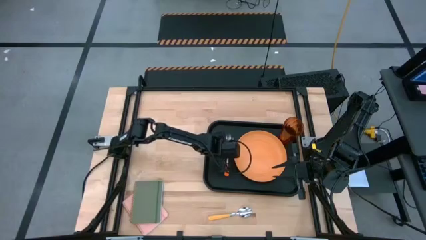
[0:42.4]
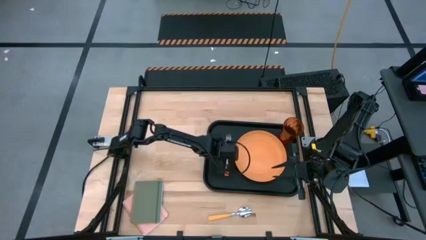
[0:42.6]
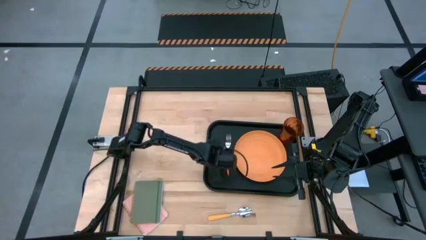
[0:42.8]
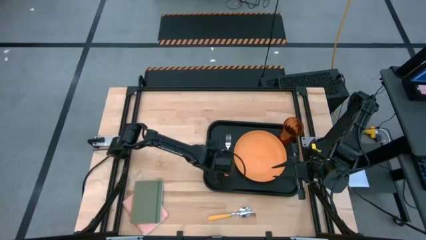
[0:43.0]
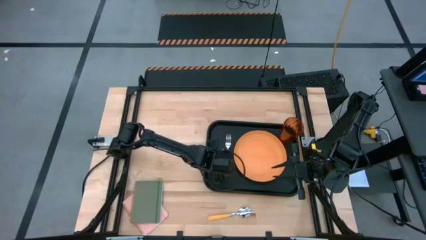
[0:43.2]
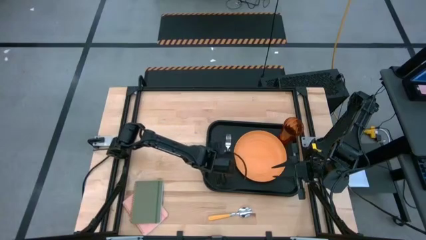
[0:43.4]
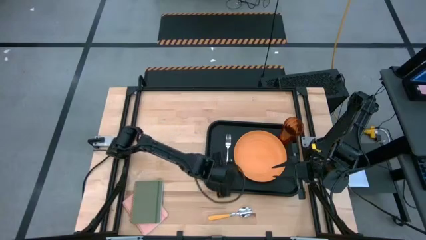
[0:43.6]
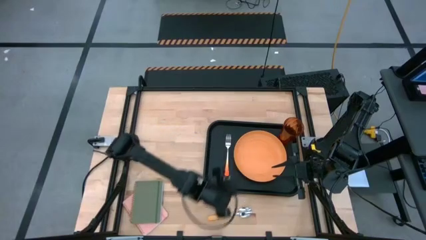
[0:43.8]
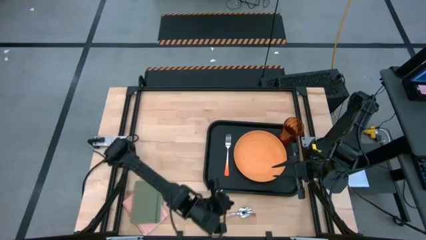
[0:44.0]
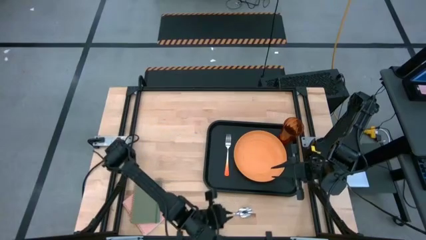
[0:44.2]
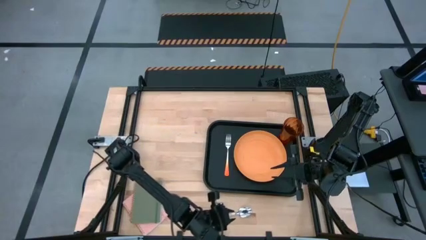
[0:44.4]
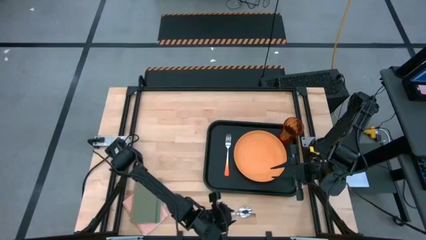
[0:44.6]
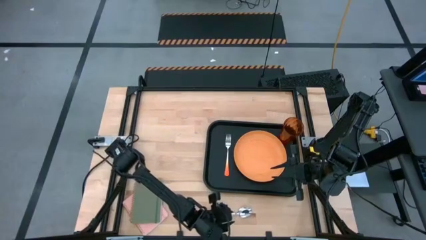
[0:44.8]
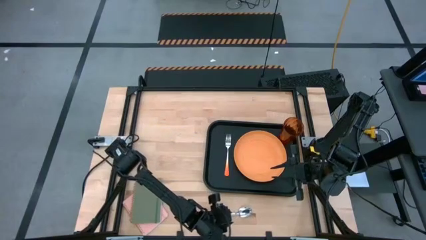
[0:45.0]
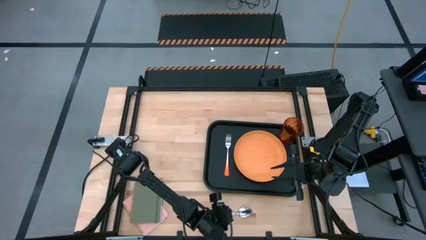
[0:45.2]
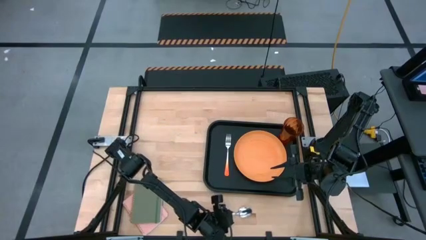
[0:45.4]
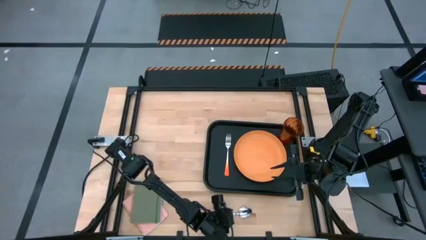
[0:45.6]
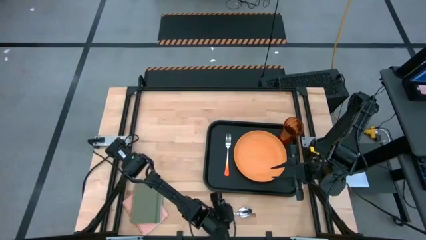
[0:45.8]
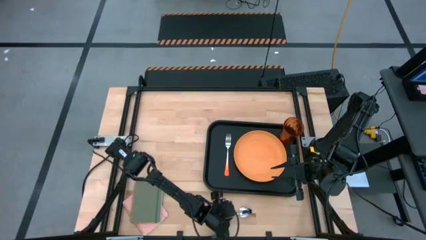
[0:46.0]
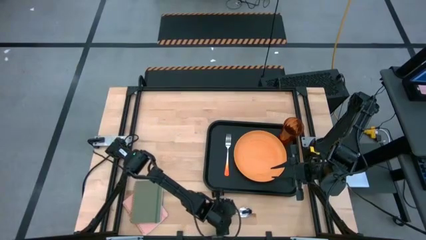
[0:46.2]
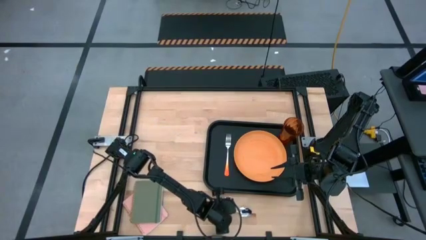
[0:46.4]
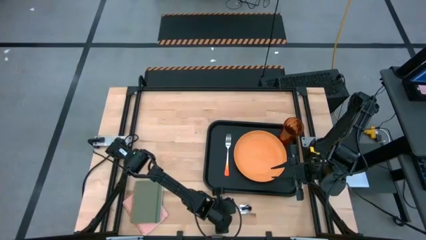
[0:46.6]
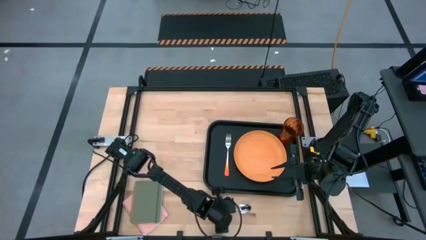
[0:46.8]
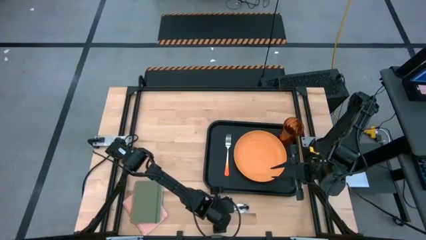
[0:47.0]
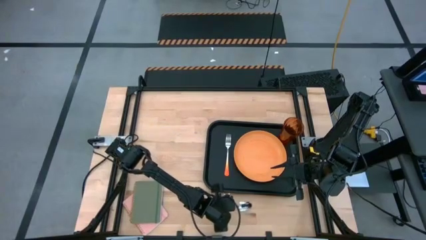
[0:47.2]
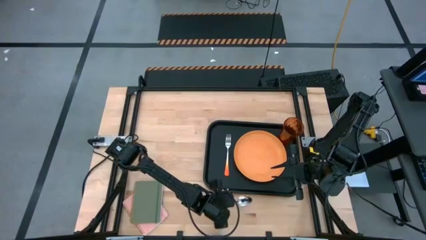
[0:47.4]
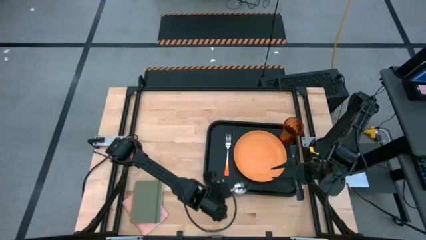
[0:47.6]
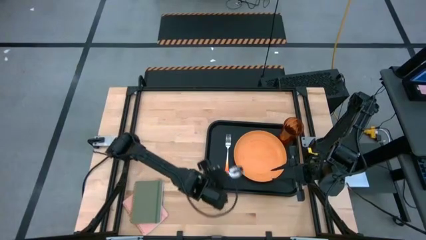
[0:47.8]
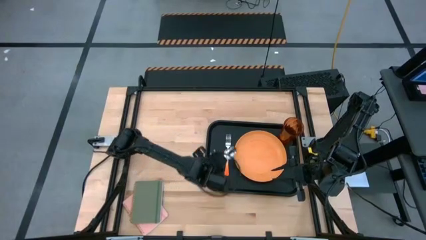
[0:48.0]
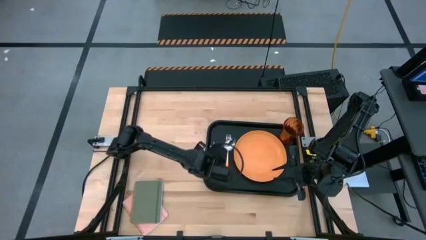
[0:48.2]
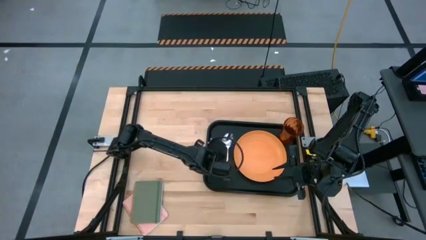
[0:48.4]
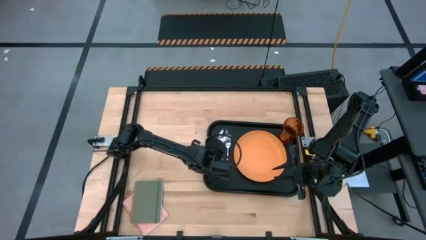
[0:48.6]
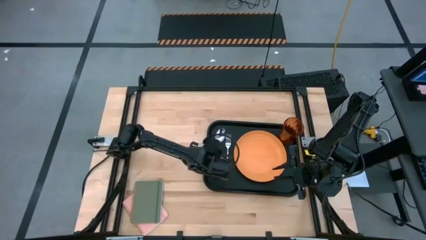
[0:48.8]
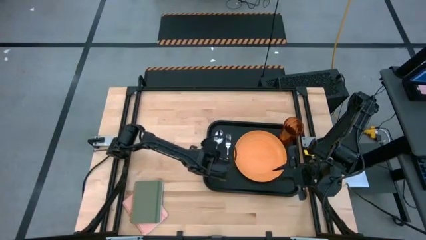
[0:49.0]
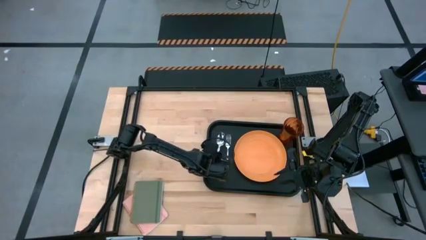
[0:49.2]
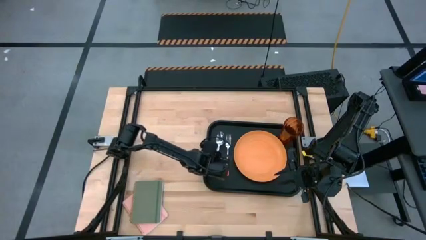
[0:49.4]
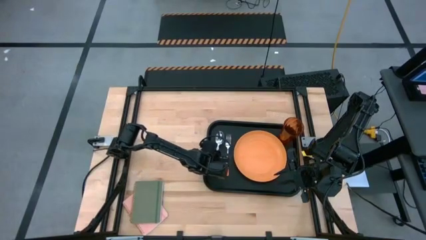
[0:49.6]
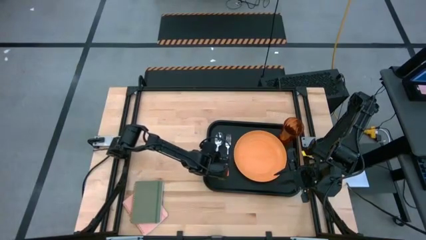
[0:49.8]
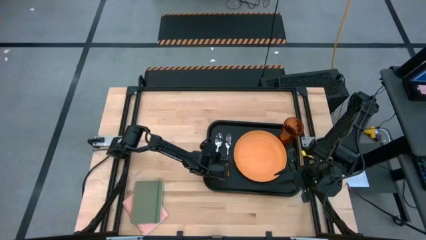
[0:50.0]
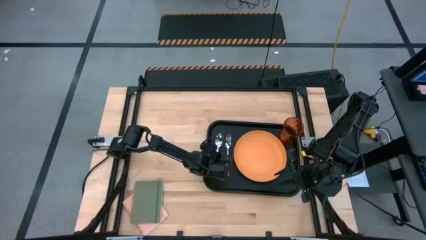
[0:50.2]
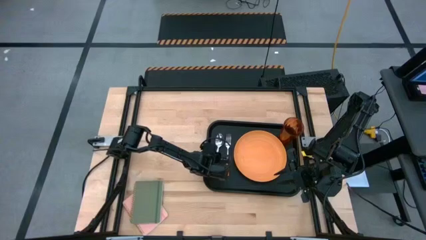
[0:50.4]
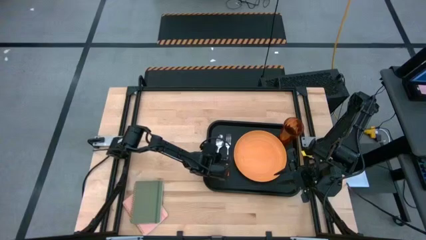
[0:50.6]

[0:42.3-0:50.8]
Task: Pick and place plate/cup/fork/spoon on tray
Put the orange spoon on the black serving tray to the left of the orange fork

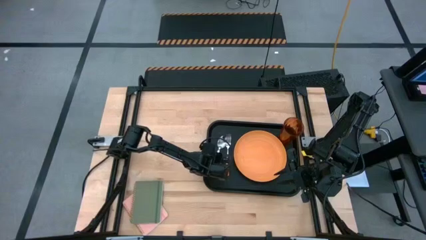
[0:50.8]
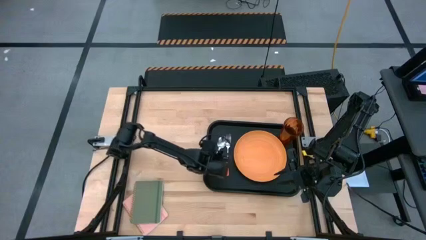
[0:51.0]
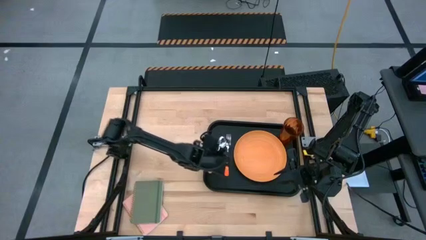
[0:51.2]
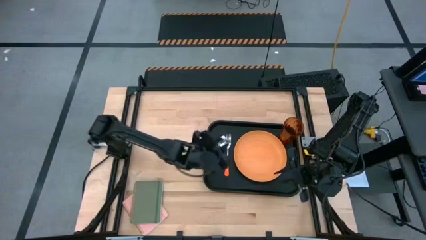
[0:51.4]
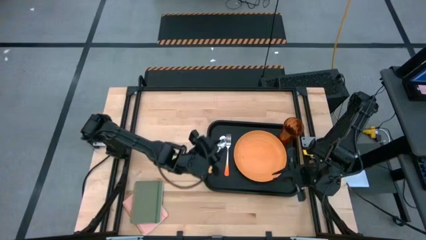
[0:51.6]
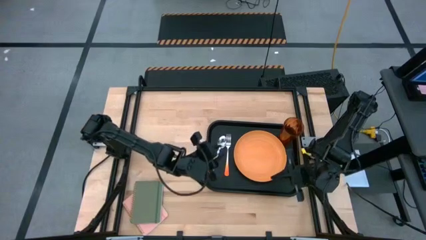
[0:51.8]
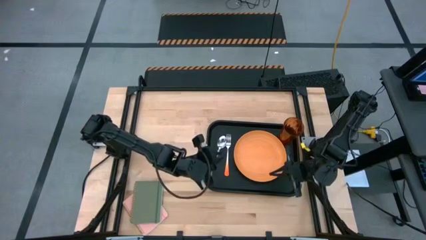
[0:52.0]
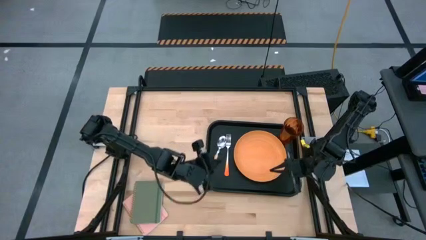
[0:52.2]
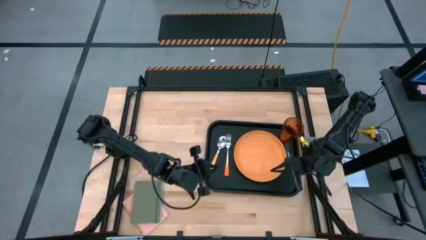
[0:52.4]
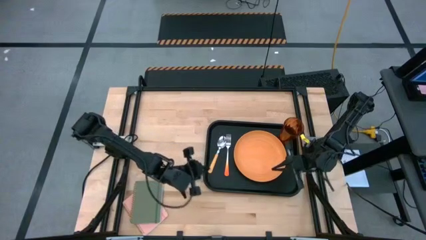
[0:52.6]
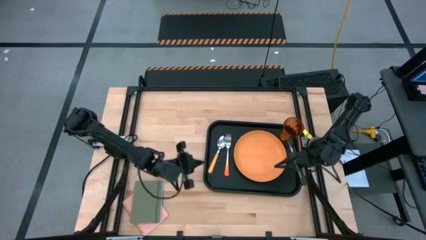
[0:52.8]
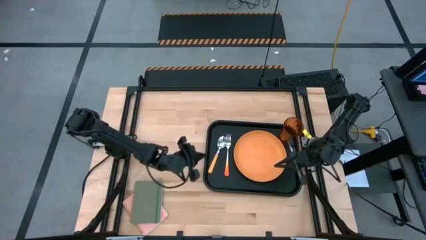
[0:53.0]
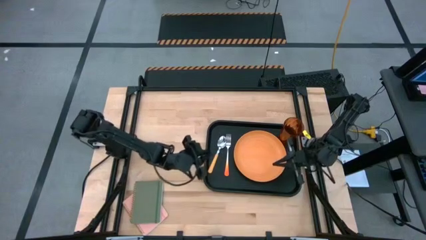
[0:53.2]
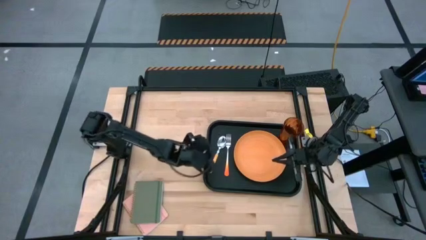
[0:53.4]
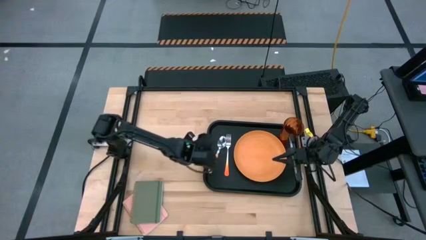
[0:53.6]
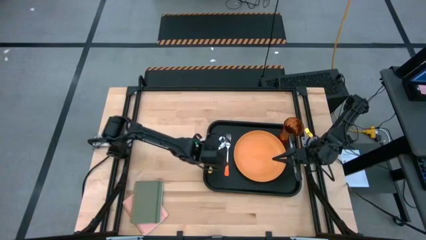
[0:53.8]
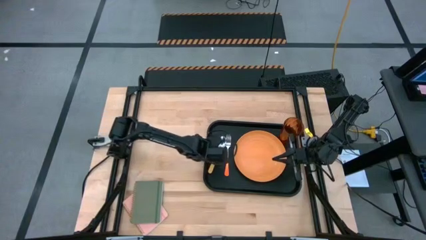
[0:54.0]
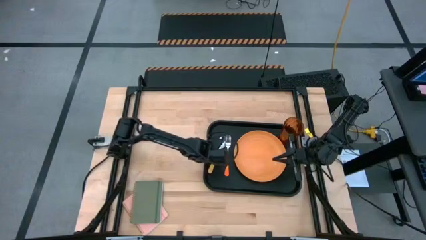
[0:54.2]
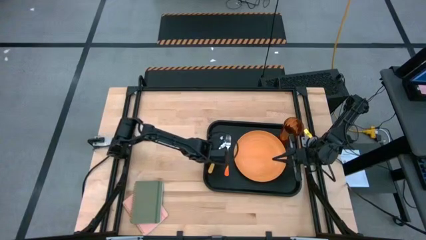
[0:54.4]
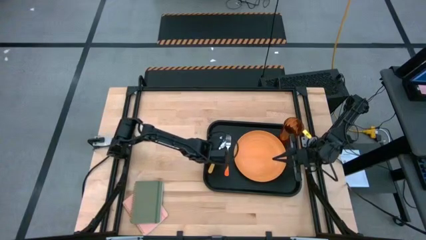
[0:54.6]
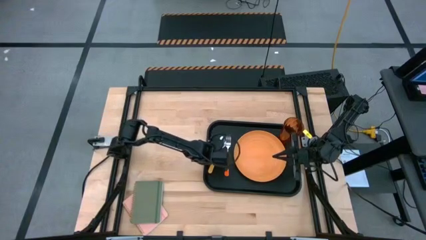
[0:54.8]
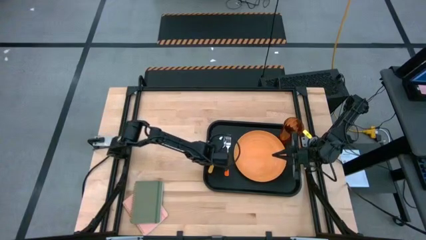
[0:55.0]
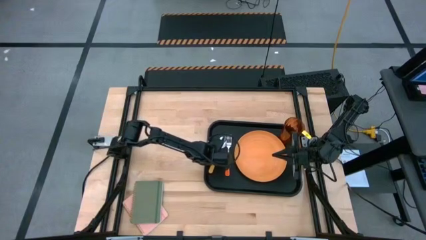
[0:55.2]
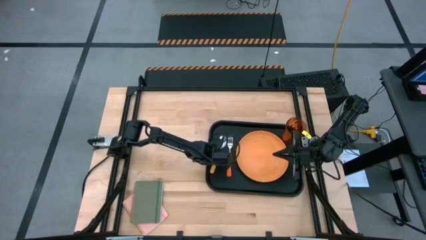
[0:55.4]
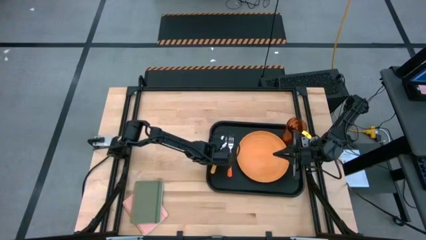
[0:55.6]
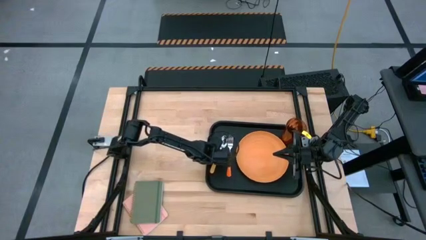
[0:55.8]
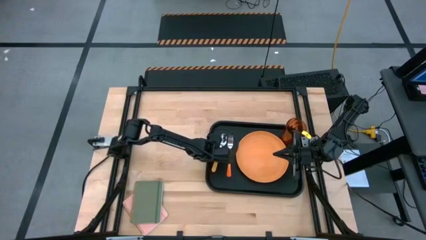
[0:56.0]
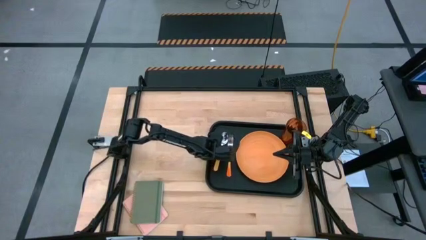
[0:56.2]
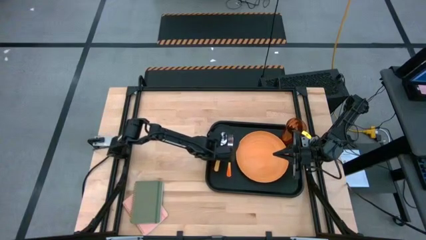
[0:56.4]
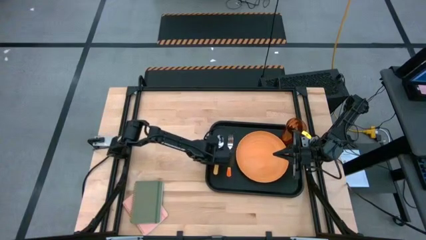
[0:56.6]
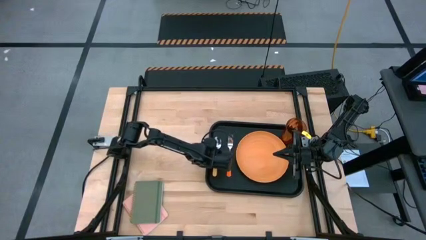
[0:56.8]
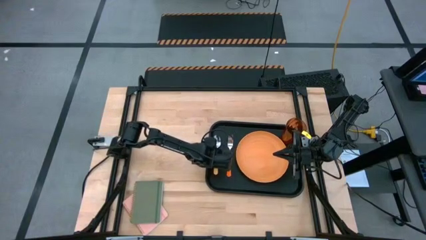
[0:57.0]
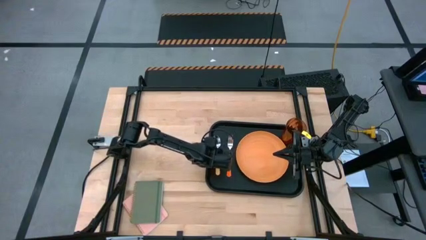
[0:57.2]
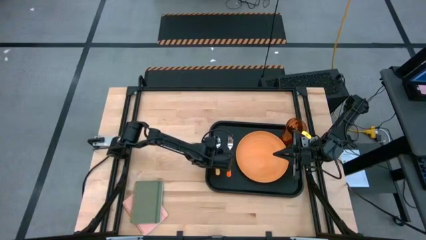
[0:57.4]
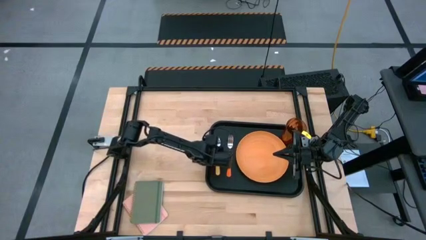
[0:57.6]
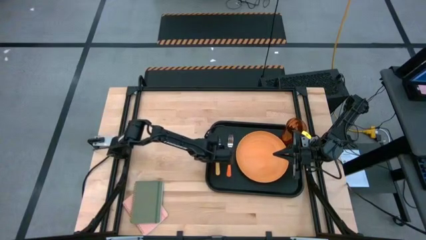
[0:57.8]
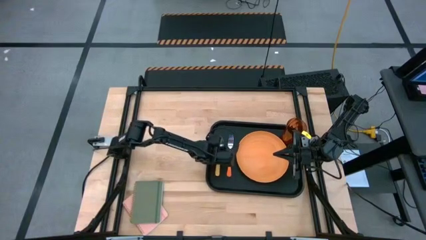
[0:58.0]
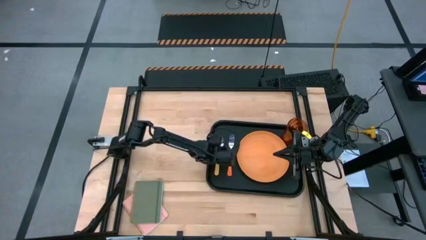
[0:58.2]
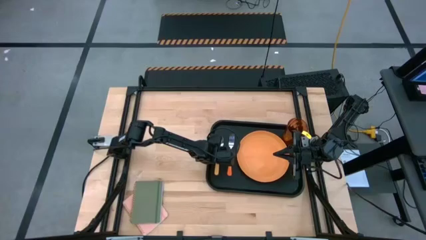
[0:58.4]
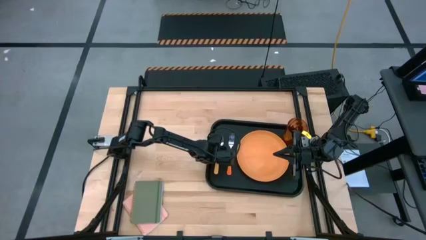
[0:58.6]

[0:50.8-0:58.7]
Adjust the spoon on the black serving tray
